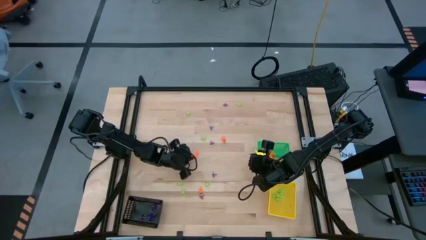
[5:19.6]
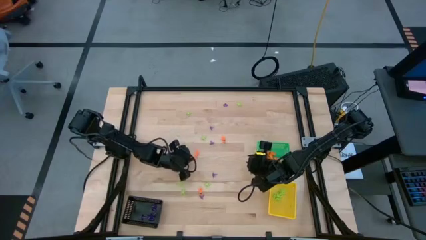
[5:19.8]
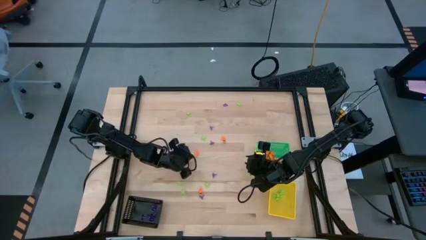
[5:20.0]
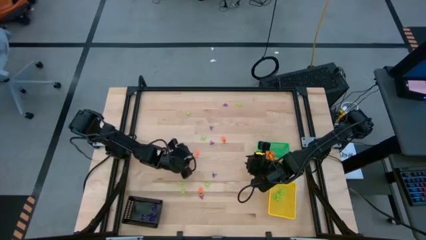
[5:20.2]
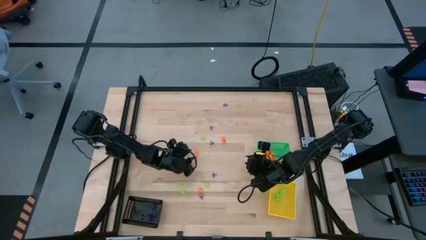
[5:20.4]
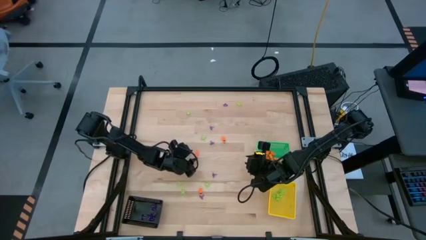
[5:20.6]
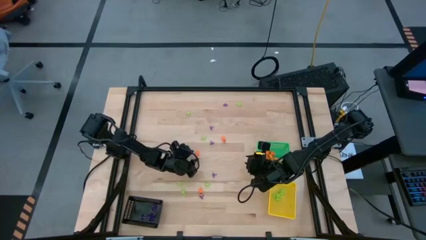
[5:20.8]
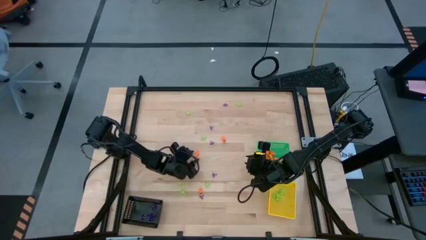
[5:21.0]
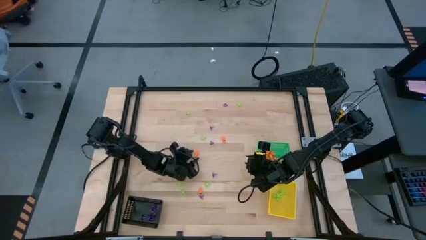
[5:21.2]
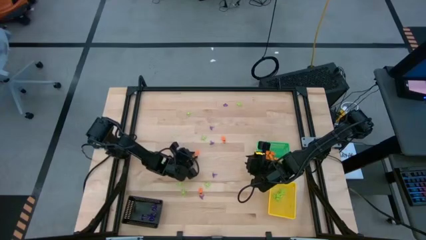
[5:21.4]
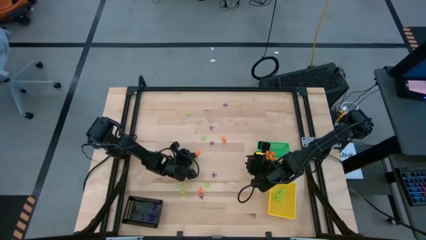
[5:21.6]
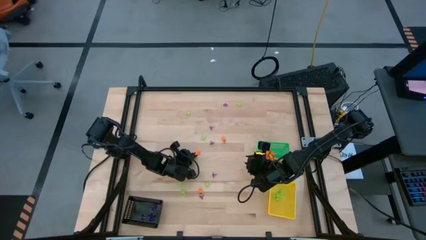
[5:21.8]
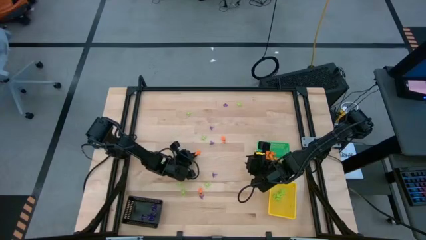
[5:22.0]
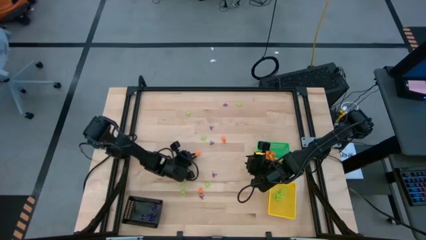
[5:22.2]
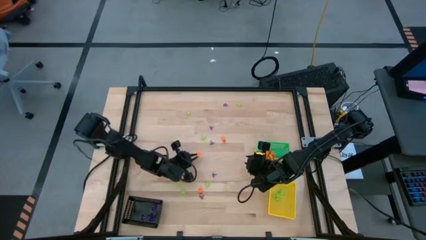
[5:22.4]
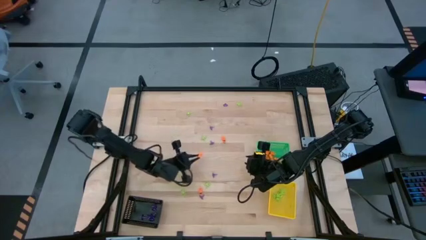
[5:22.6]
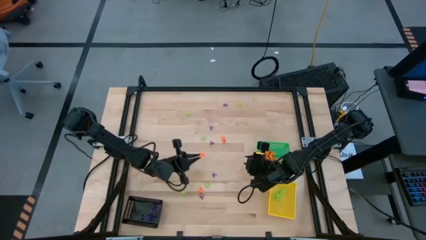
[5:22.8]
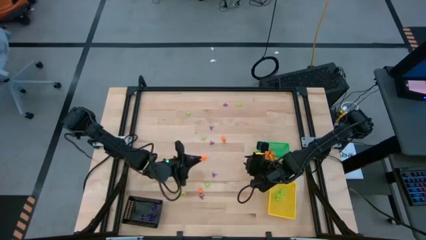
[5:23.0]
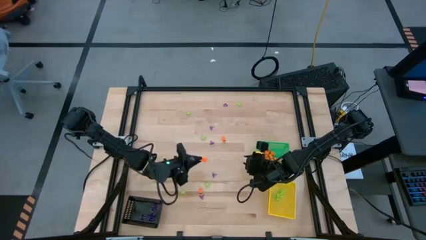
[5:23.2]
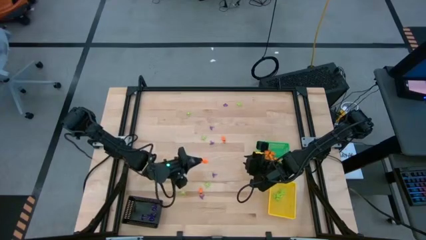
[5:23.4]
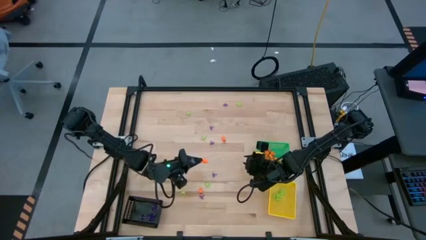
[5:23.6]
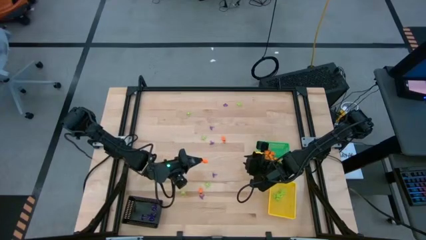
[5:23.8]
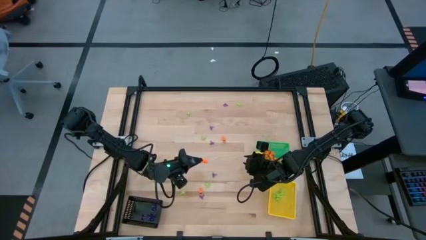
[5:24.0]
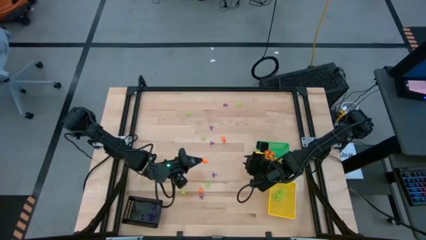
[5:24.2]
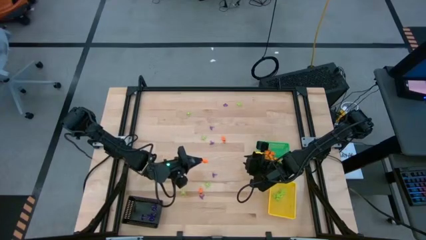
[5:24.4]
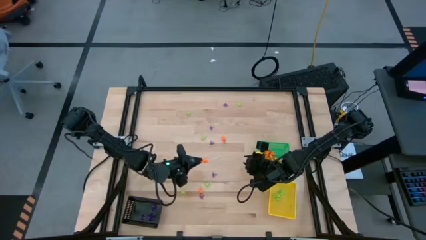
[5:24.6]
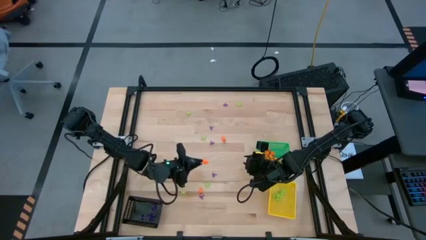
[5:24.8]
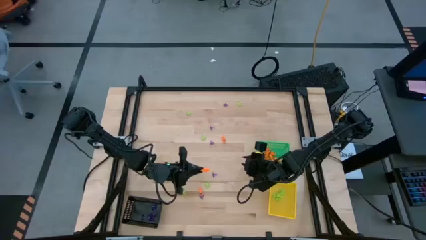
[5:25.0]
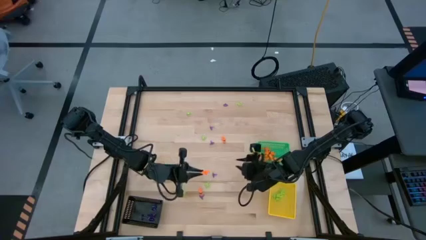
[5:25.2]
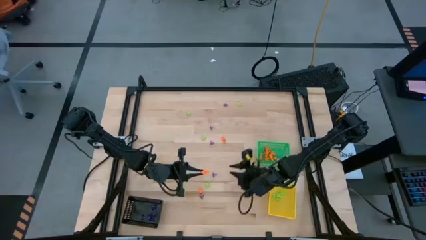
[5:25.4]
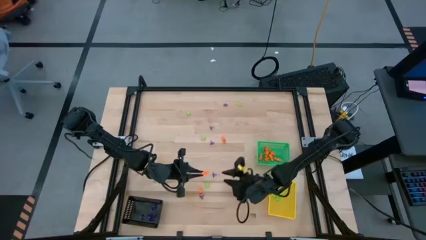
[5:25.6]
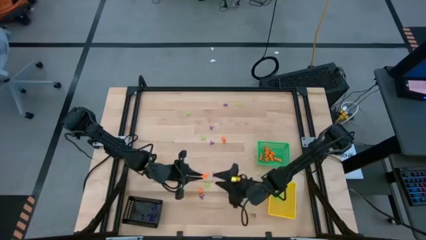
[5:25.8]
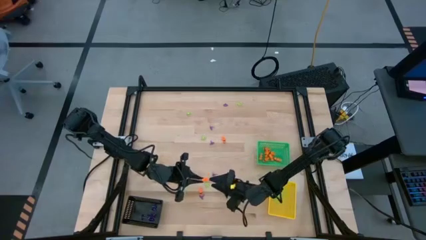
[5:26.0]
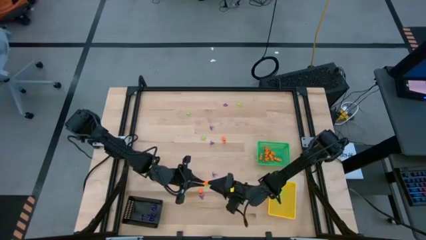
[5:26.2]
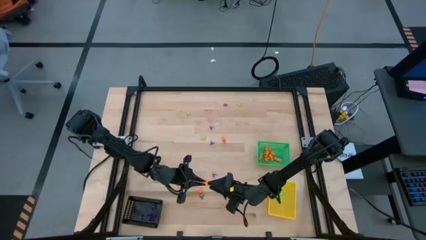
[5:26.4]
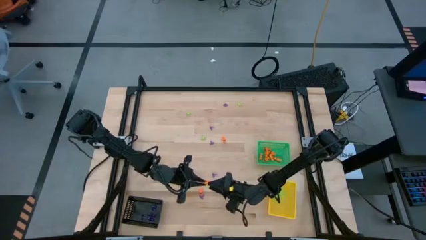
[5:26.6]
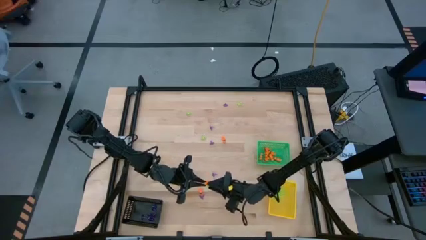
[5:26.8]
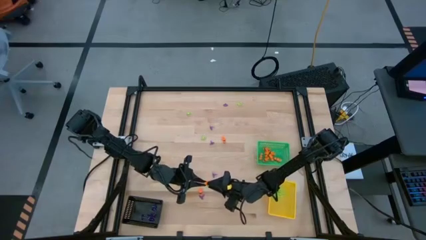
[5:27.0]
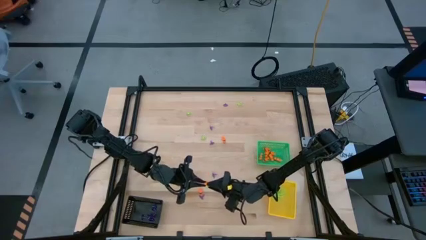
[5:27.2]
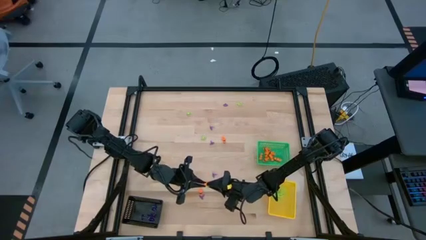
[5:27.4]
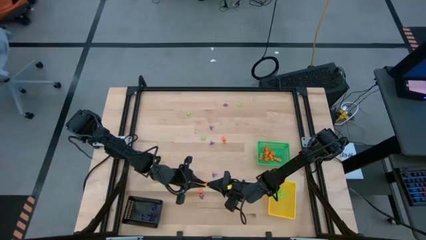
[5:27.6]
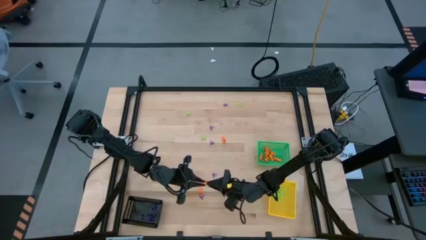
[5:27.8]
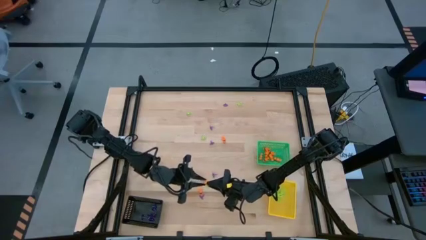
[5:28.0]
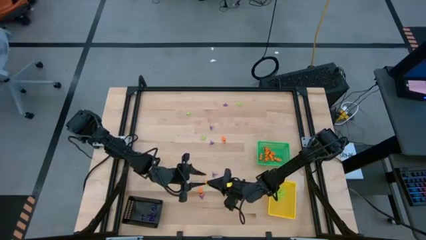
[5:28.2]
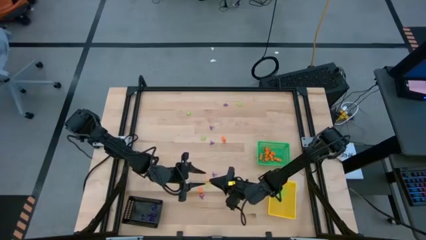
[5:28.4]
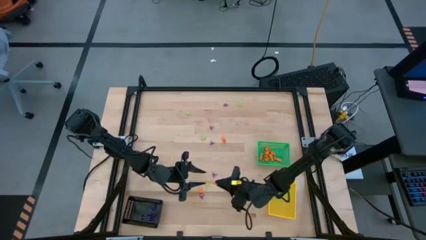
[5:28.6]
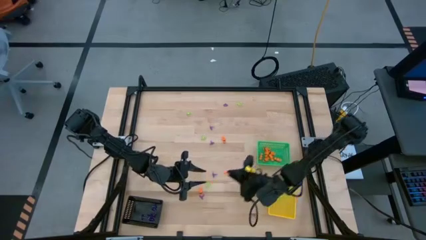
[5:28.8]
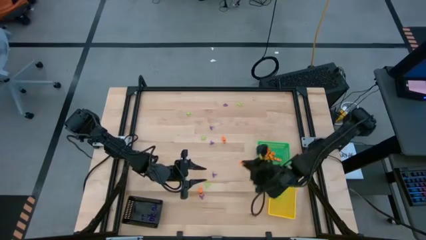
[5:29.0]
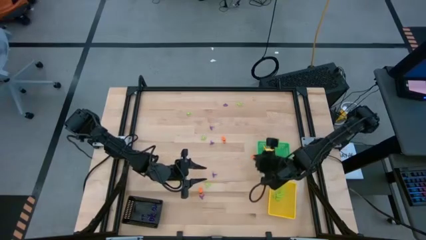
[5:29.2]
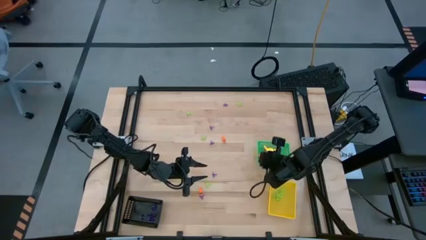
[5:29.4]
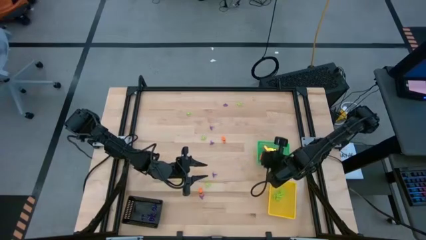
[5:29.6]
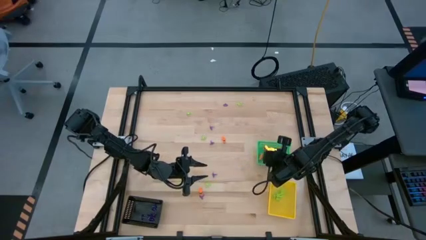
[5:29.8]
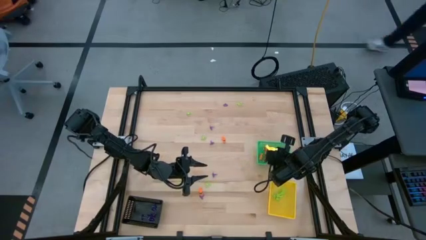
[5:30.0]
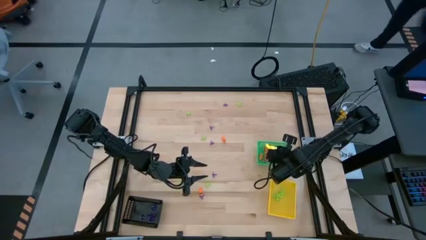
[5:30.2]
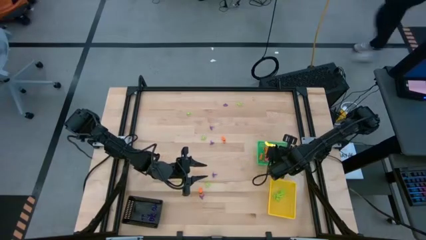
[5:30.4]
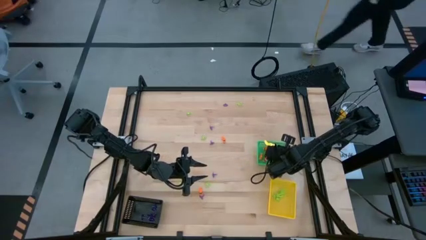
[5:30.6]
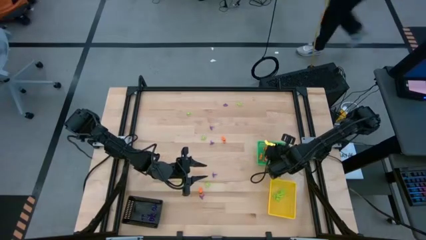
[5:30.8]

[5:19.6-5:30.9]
Task: Sort Halloween decoration
Put the orange skeleton toy into the green bin
